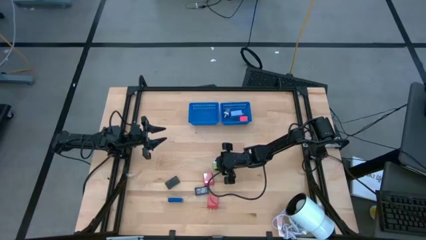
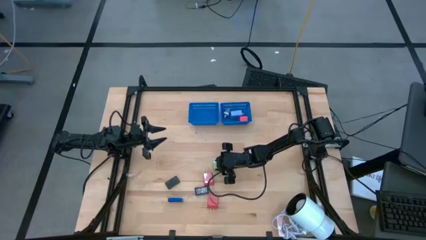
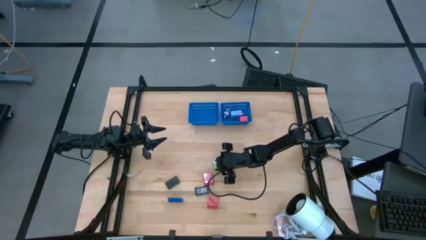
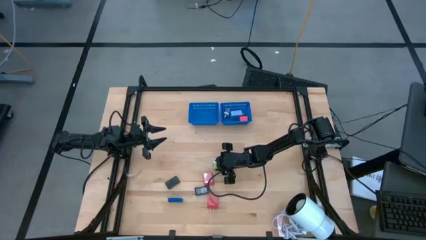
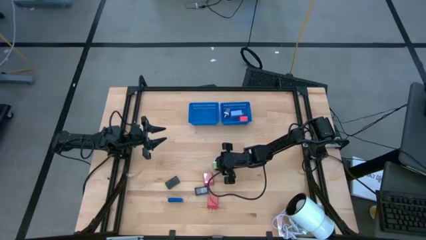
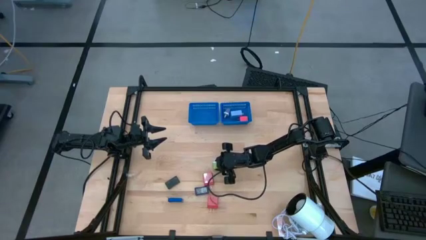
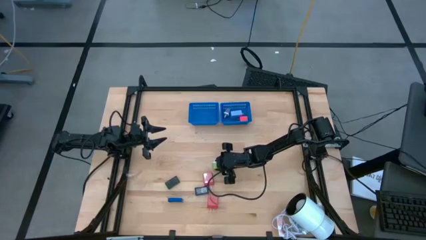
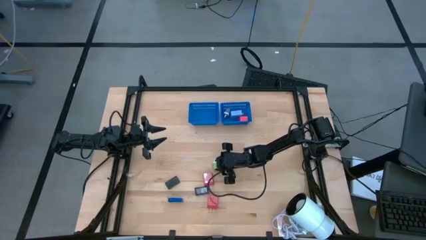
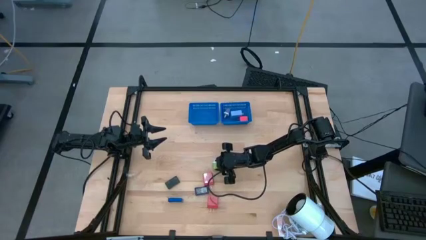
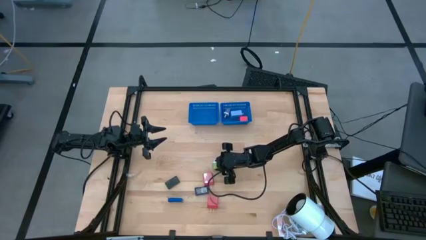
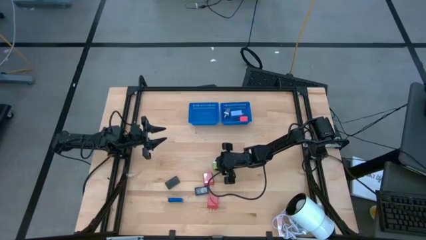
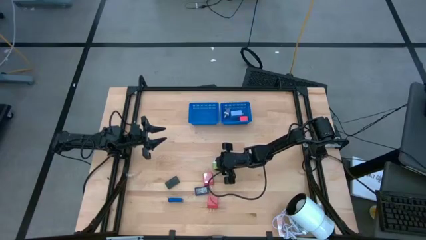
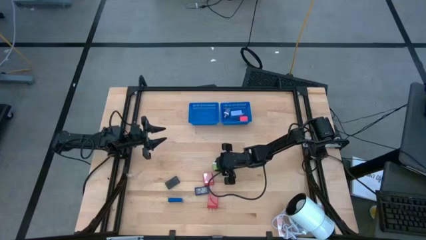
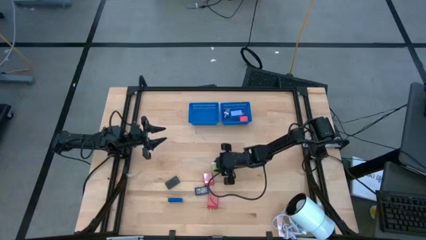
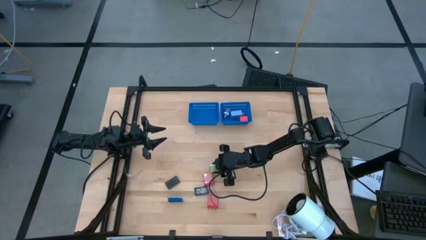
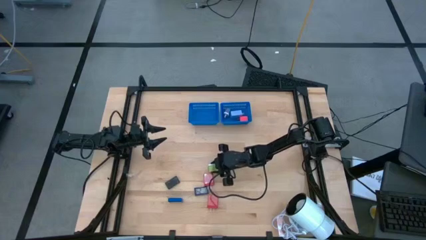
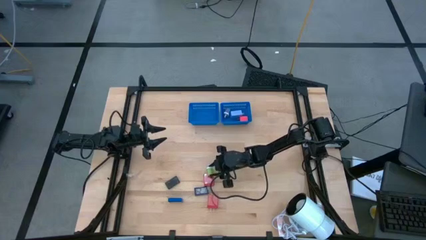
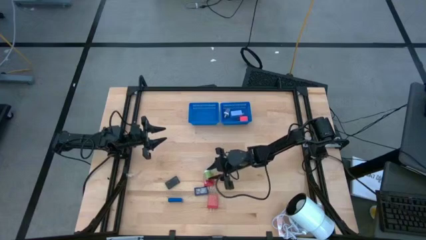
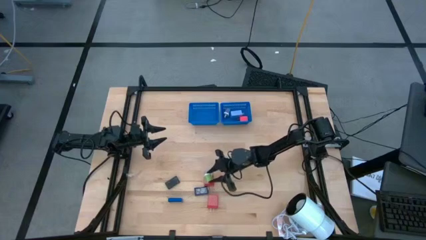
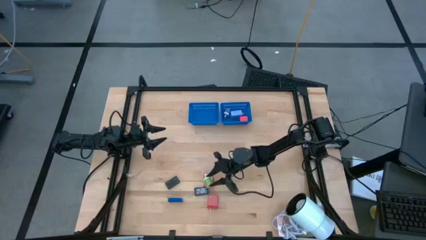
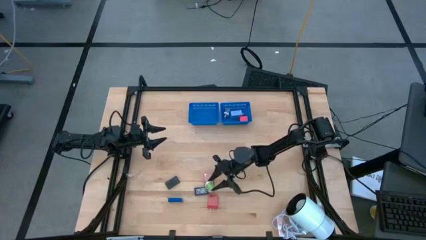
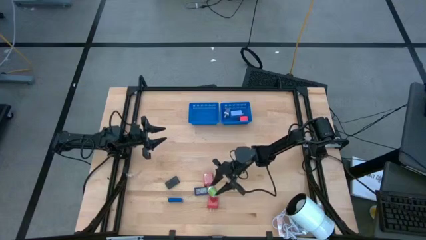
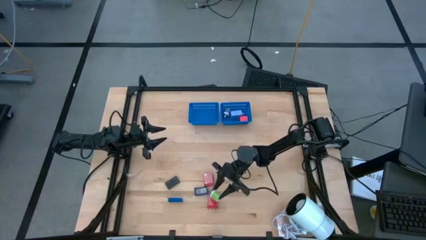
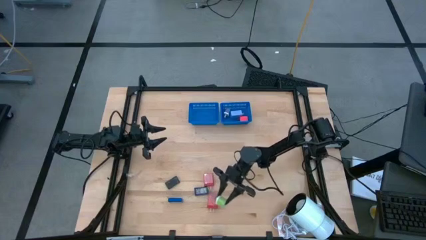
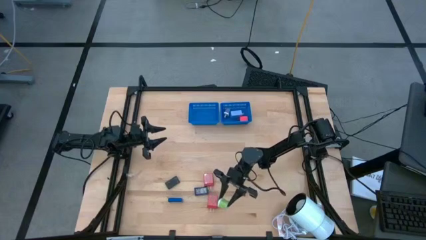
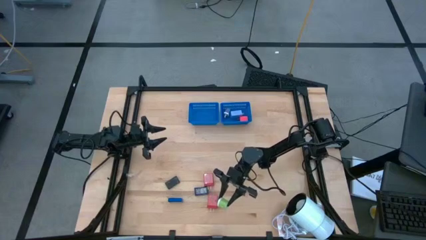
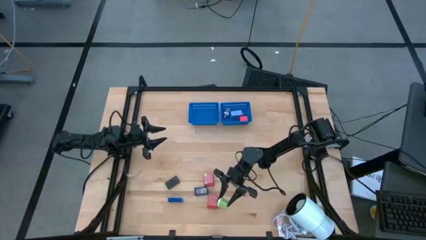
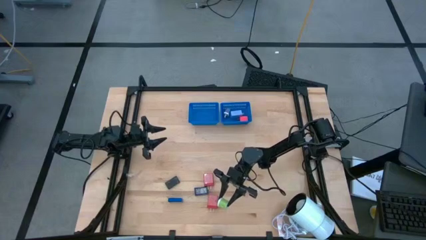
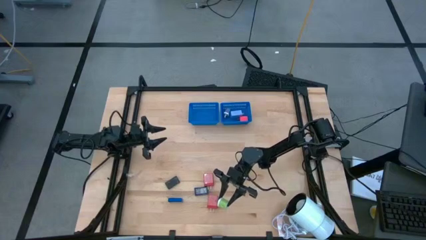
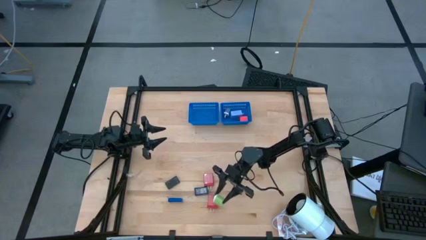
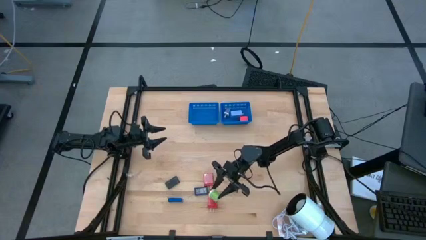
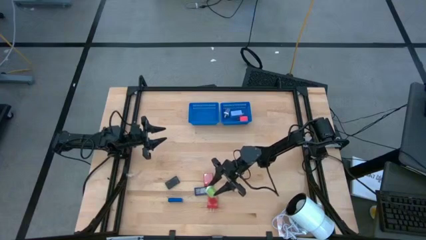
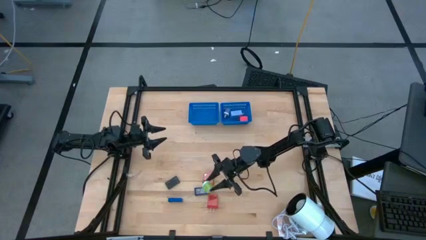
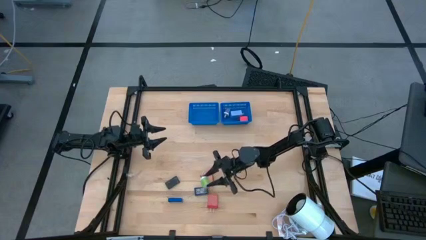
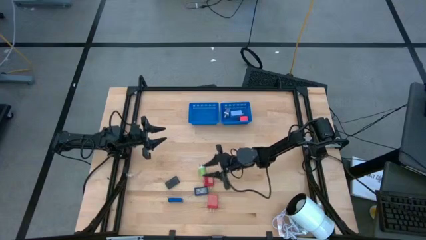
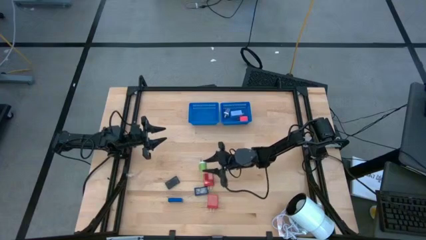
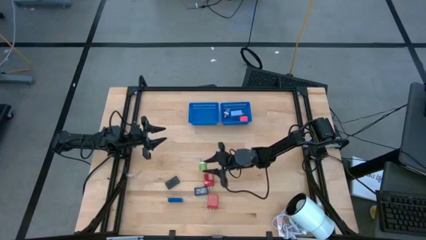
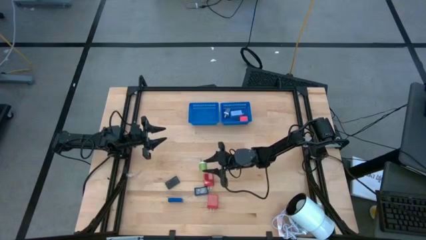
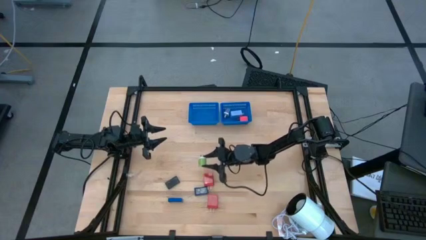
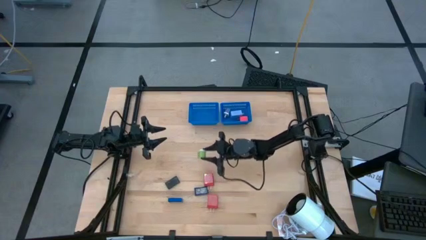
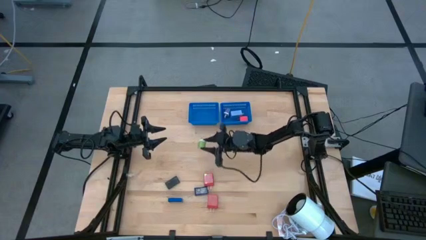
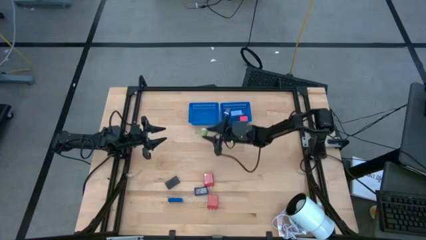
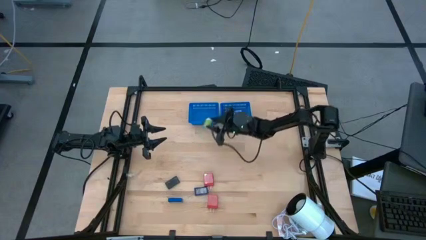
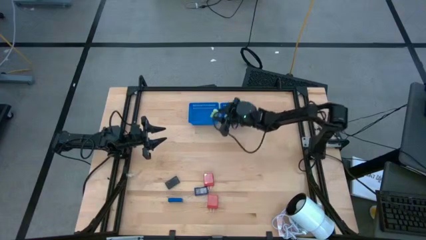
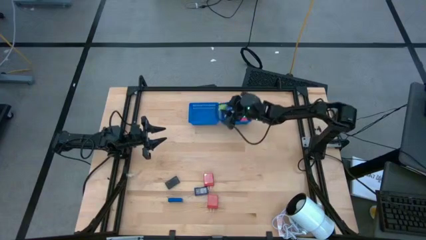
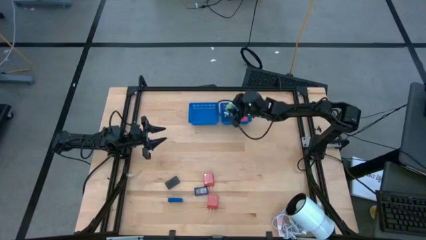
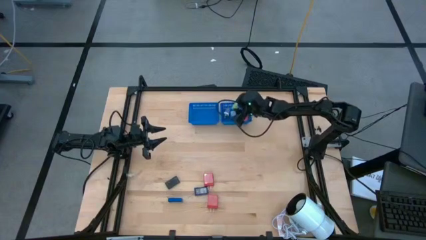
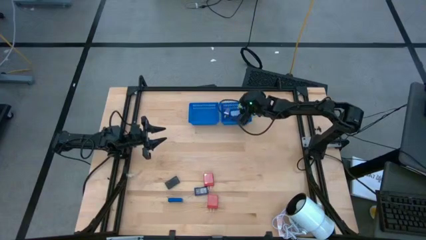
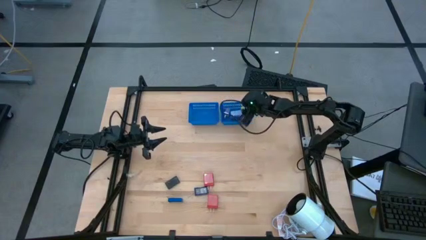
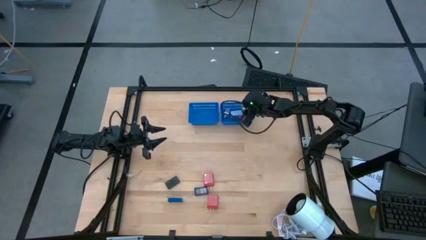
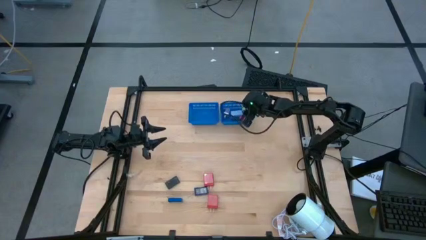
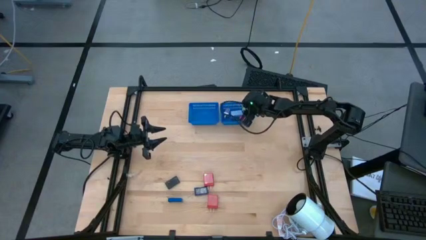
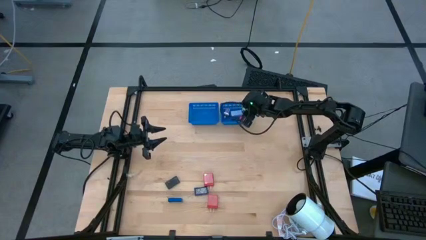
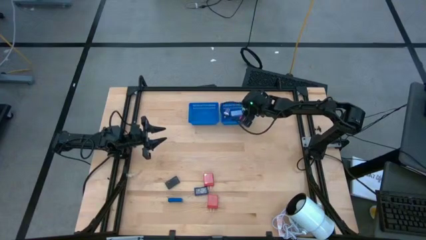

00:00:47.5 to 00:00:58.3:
Task: Pick & Place Office items
Put the green charger adapter into the right blue bin

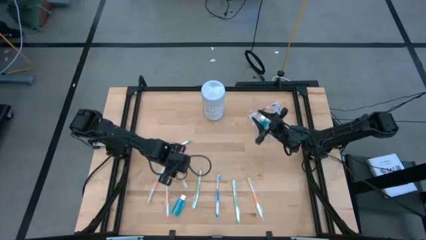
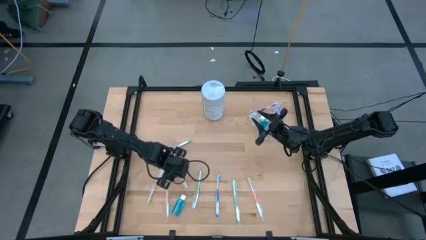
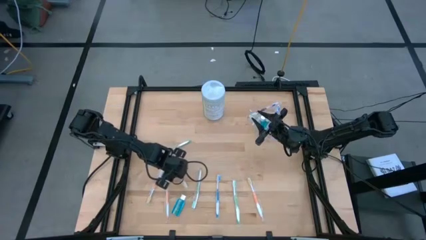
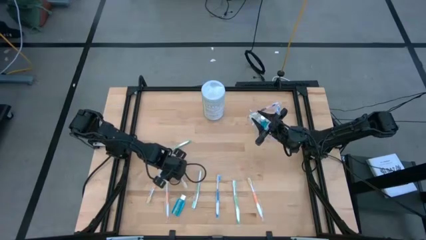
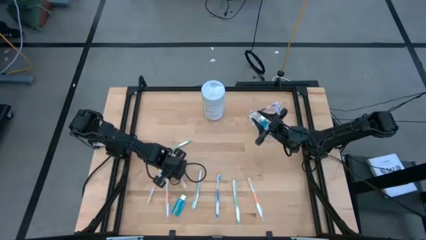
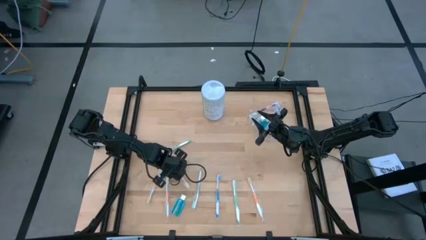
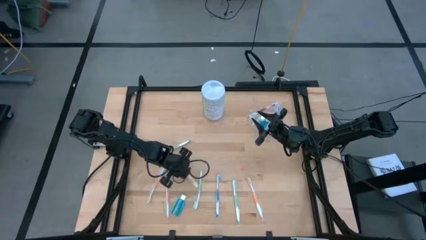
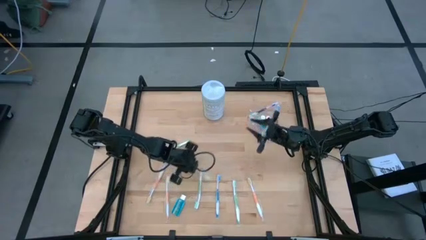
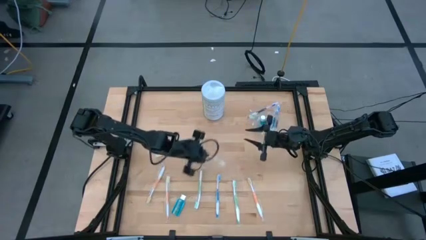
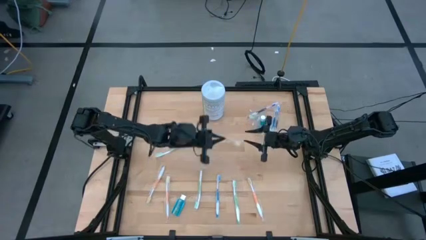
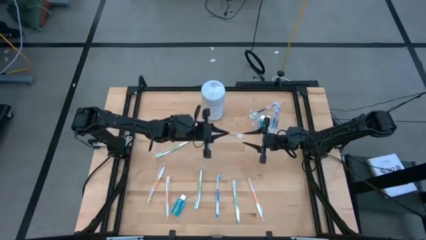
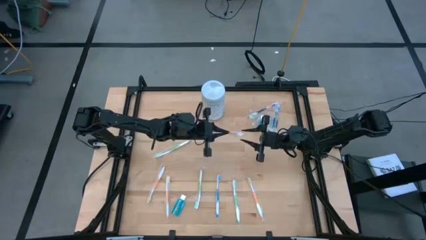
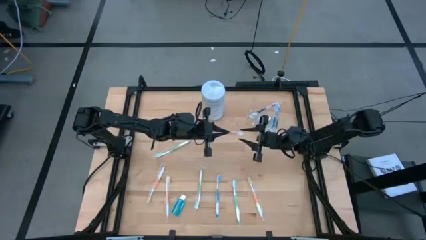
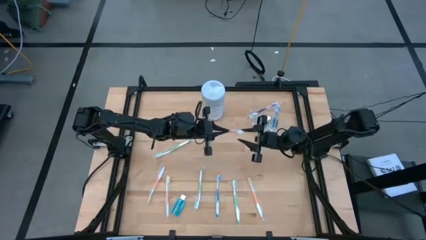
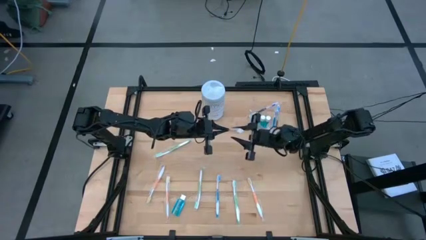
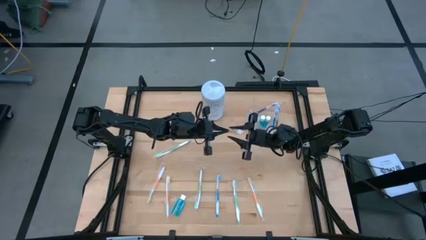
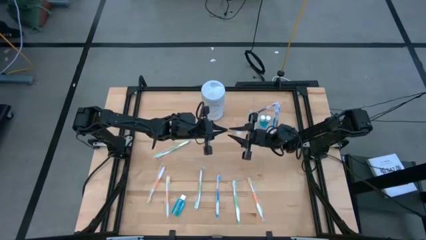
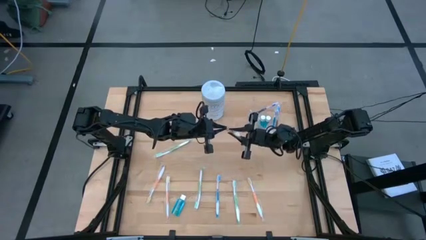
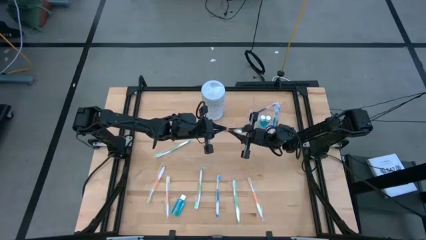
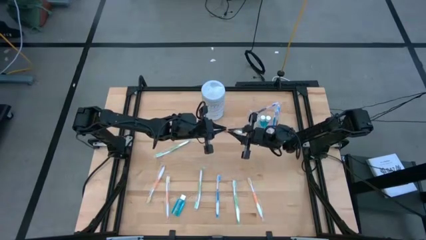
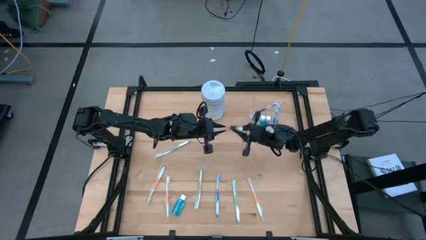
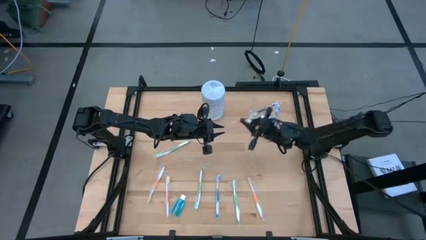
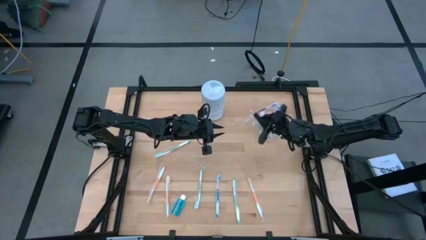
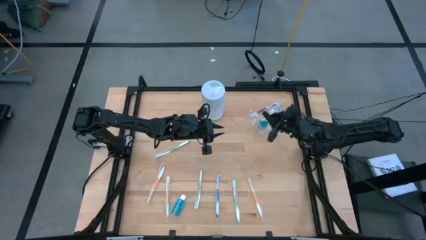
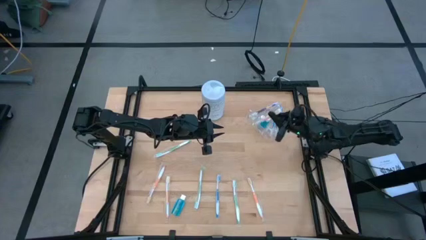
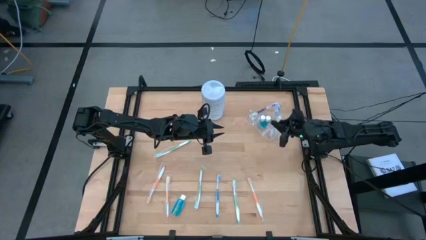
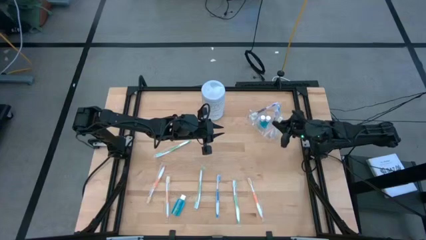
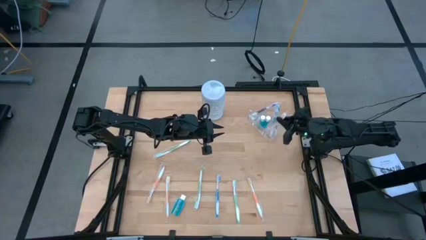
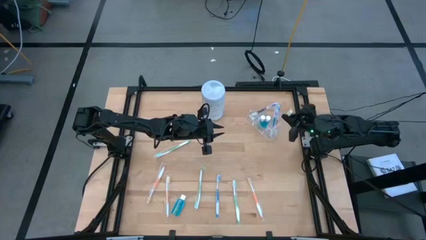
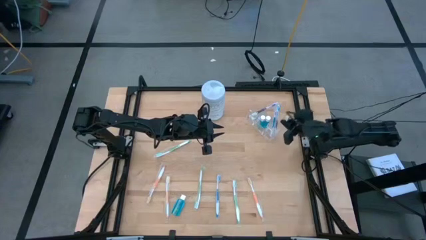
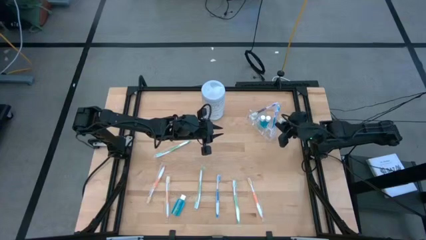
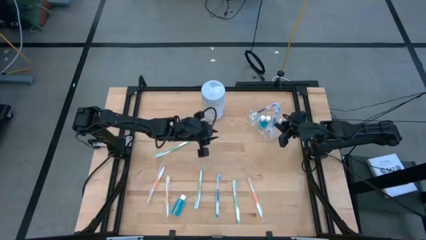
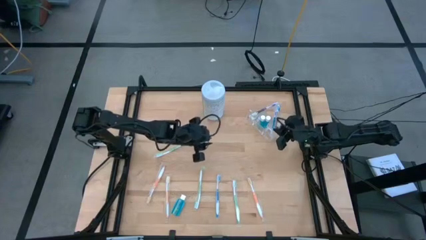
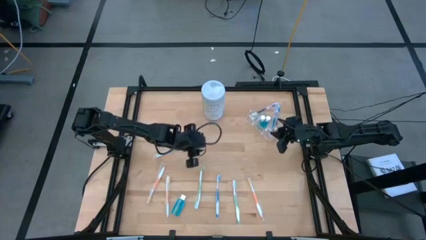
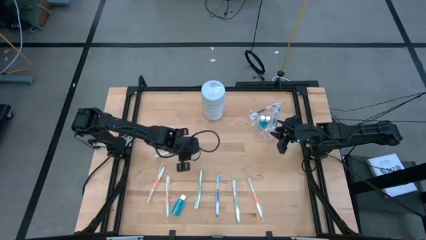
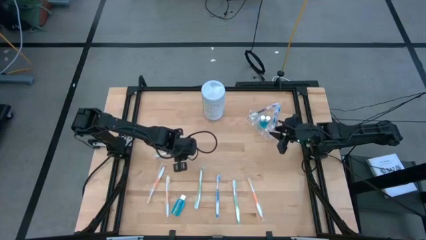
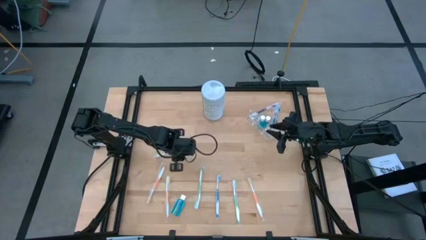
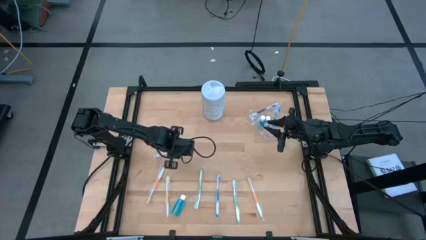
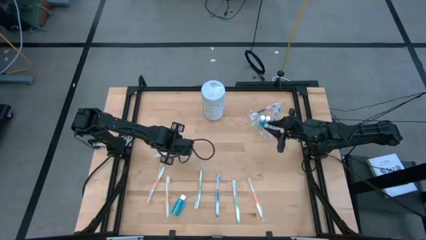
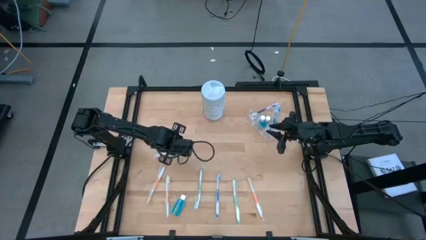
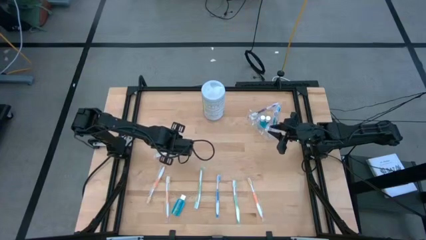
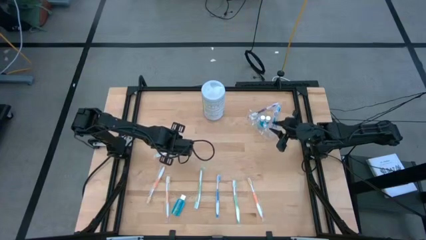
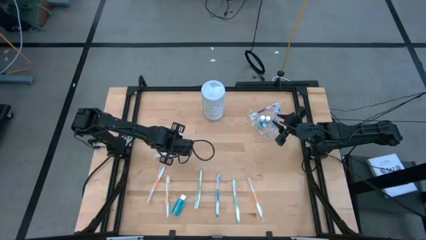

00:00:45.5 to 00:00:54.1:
Task: Pick & Place toothbrushing station
Put the orange toothbrush into the transparent organizer
